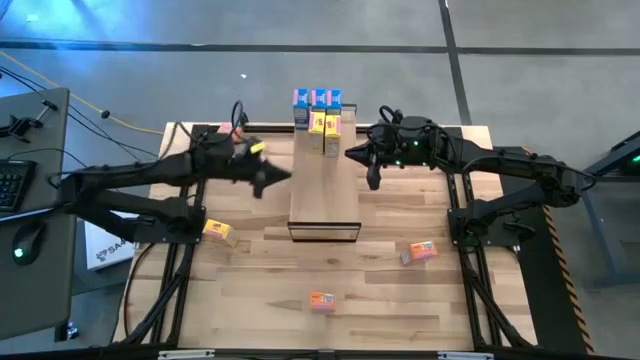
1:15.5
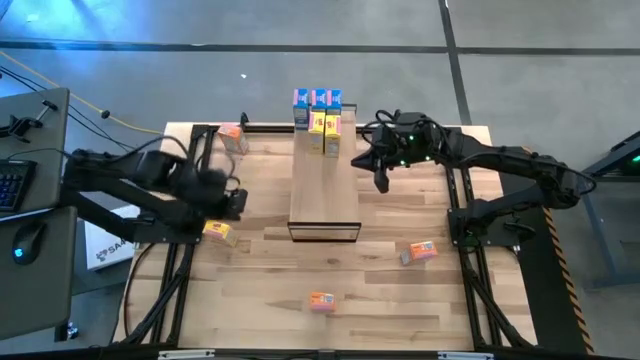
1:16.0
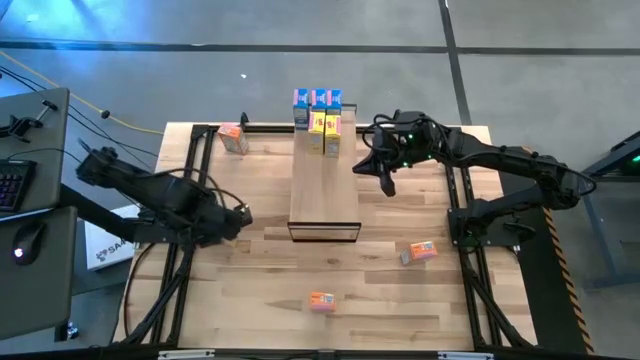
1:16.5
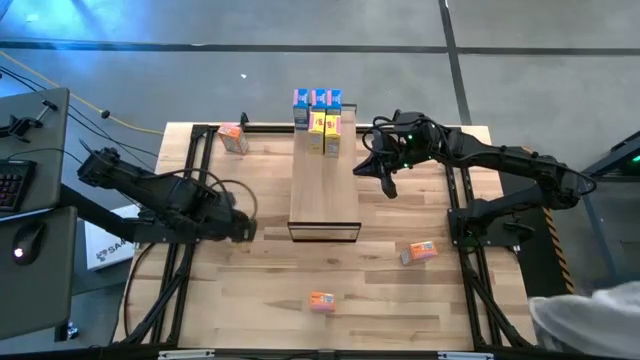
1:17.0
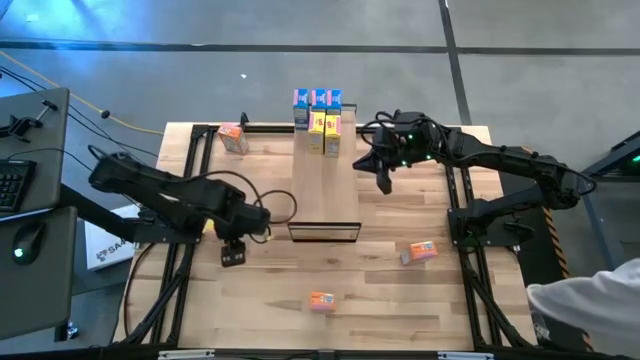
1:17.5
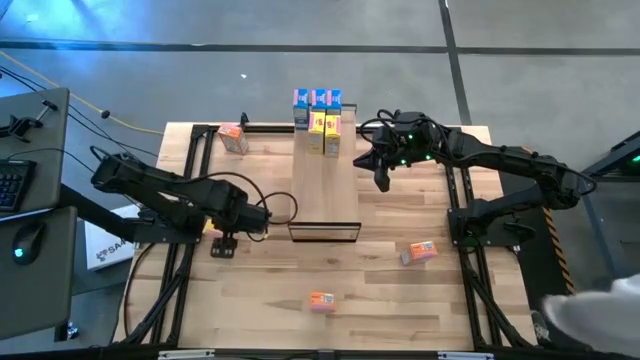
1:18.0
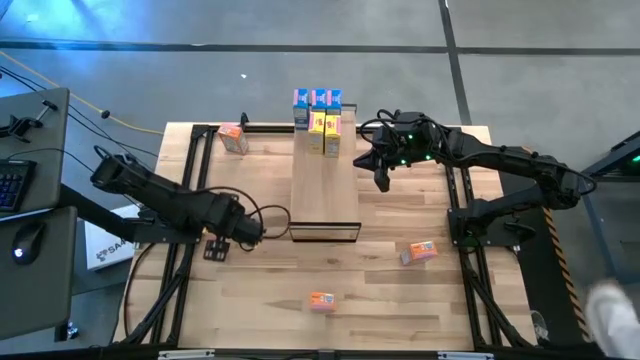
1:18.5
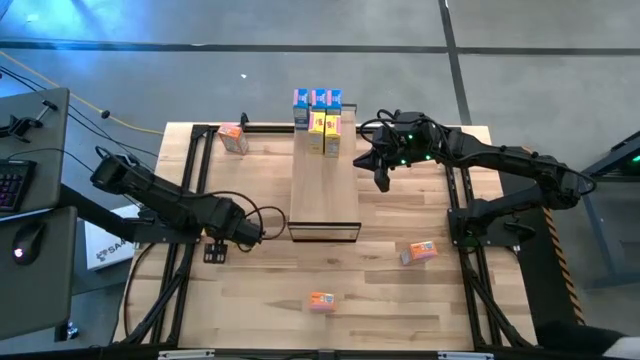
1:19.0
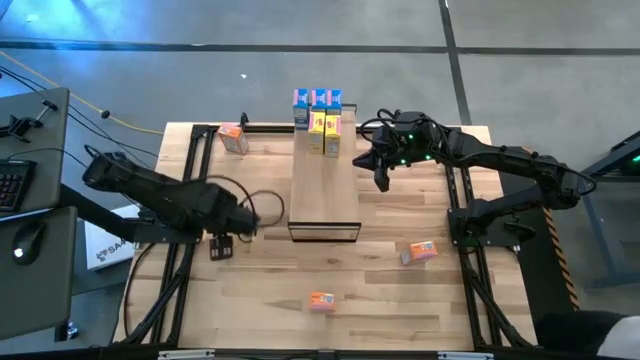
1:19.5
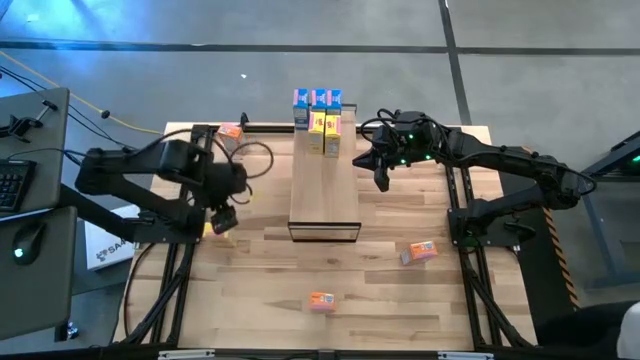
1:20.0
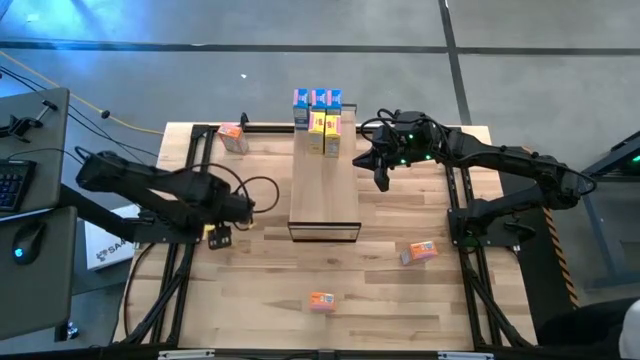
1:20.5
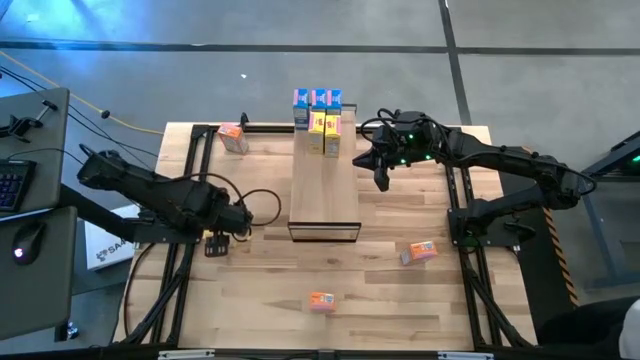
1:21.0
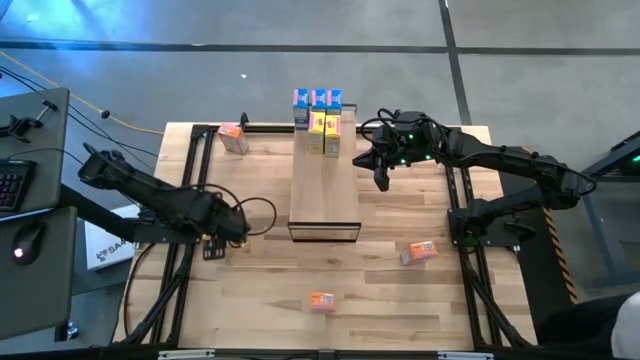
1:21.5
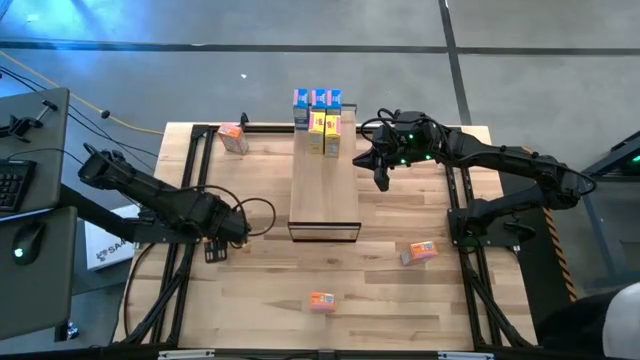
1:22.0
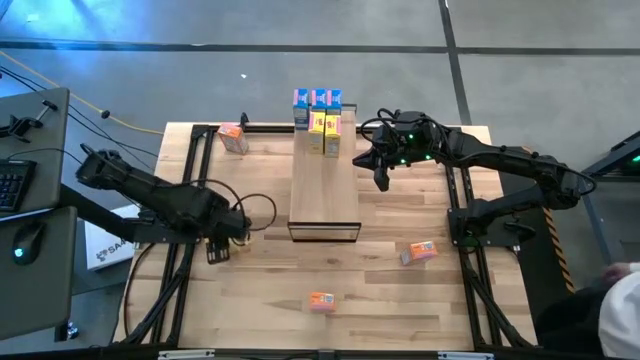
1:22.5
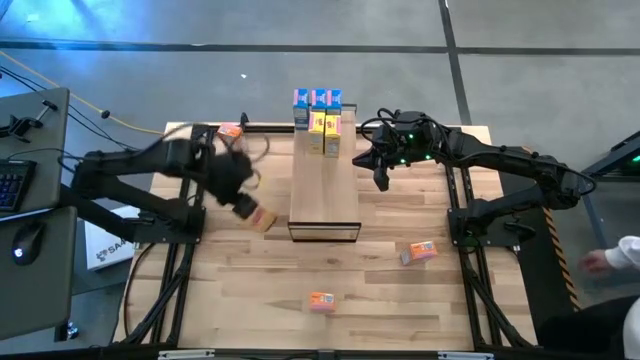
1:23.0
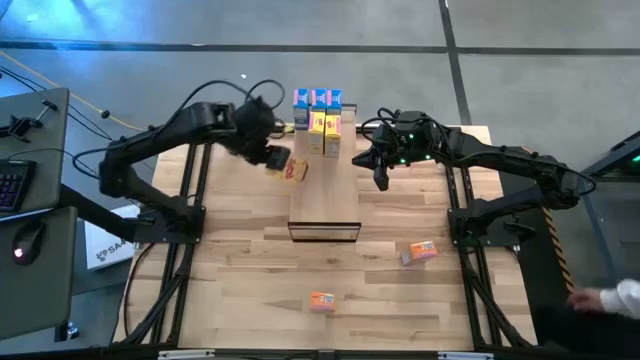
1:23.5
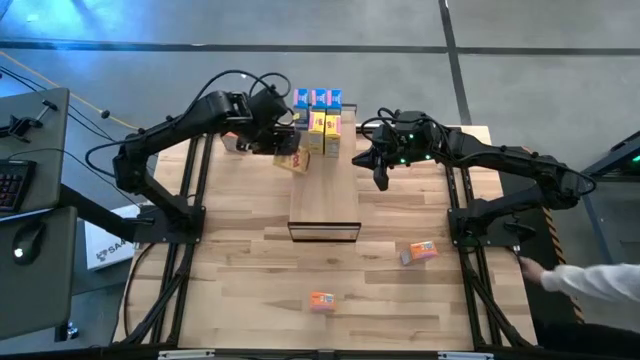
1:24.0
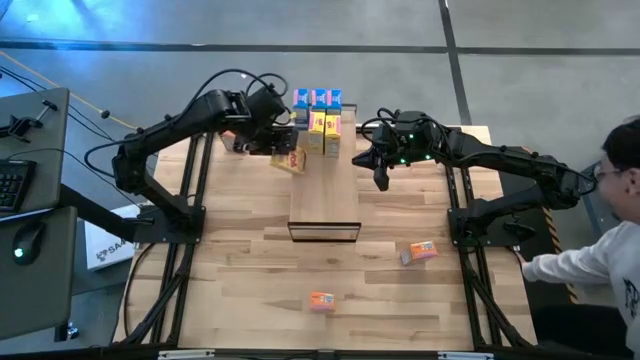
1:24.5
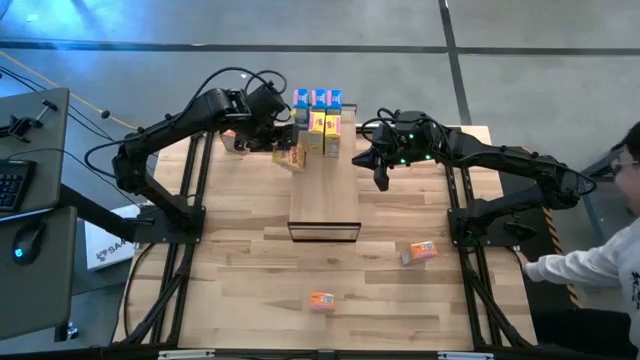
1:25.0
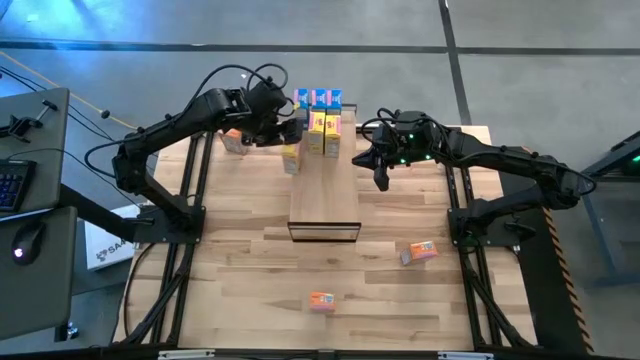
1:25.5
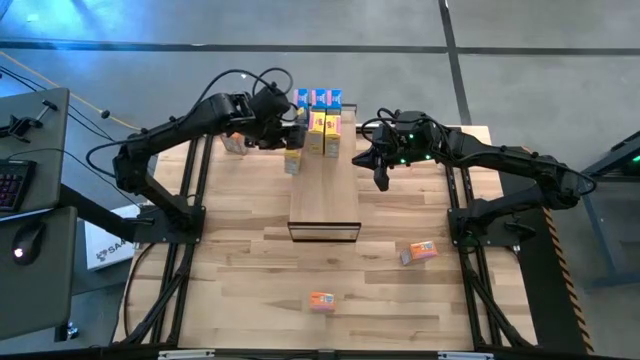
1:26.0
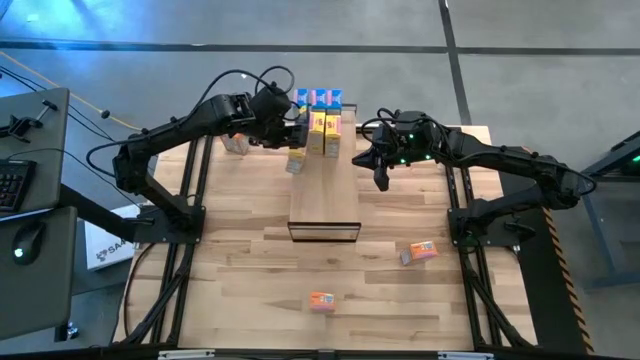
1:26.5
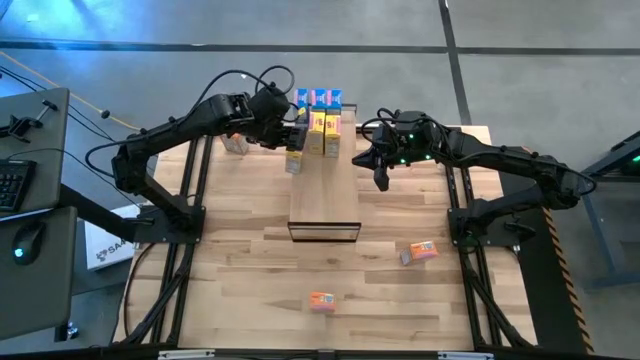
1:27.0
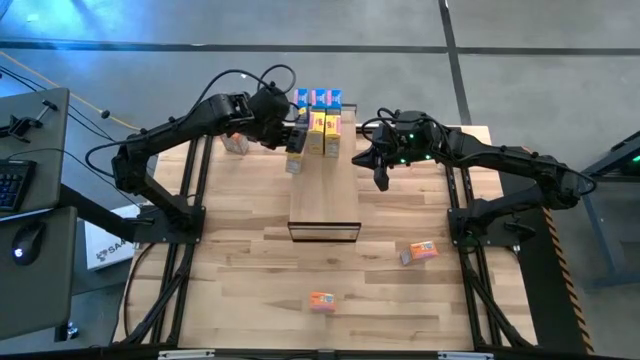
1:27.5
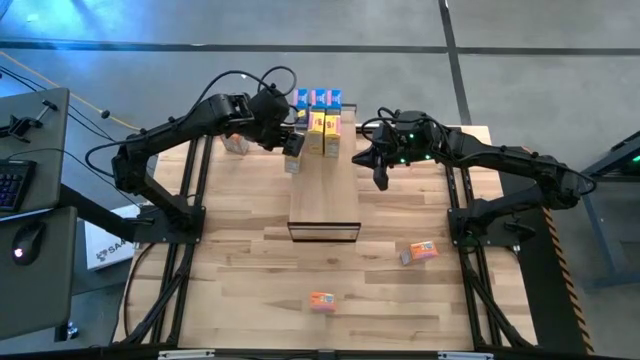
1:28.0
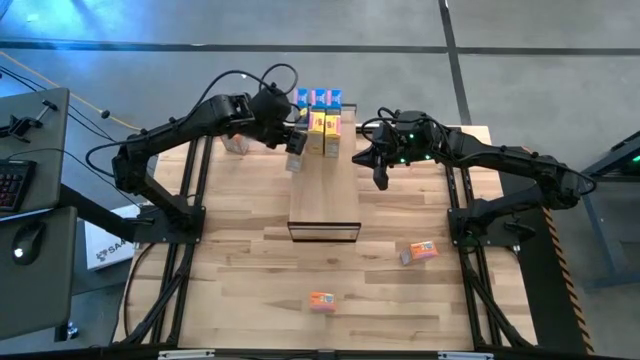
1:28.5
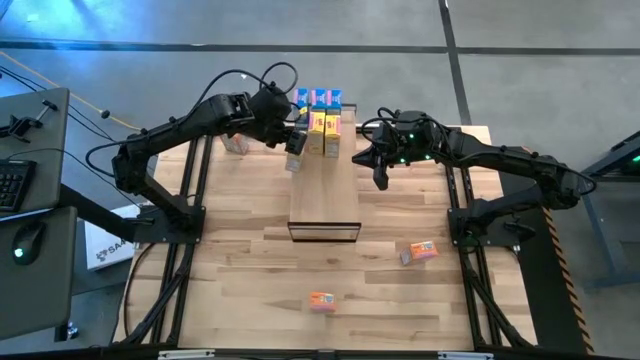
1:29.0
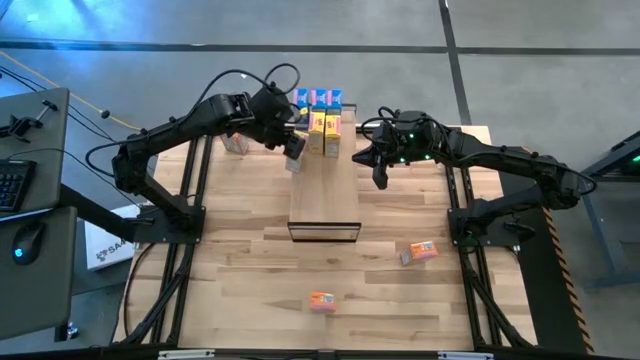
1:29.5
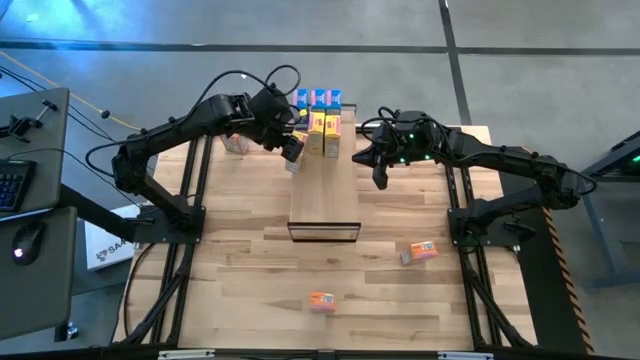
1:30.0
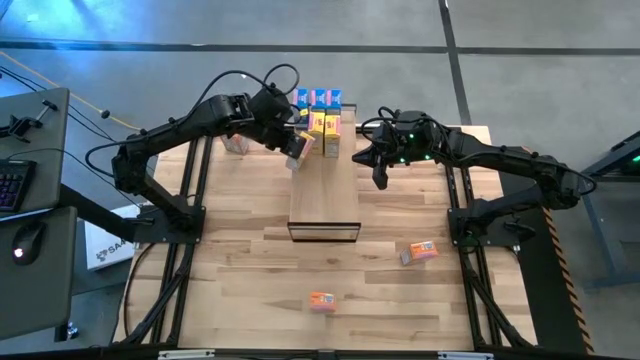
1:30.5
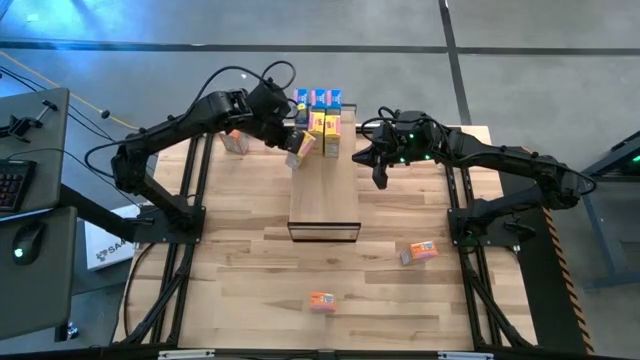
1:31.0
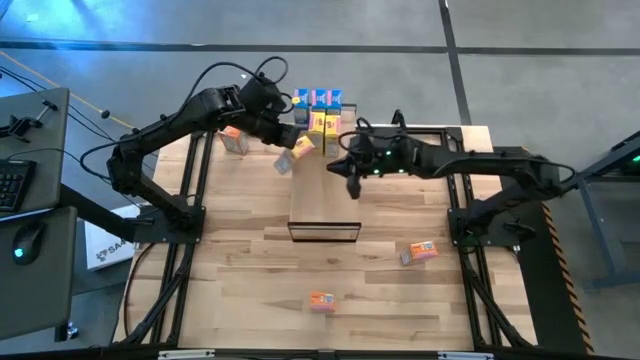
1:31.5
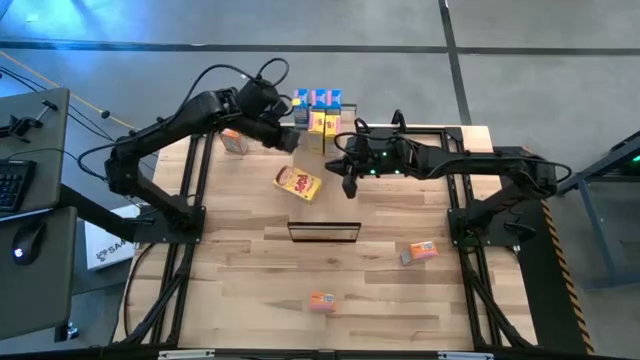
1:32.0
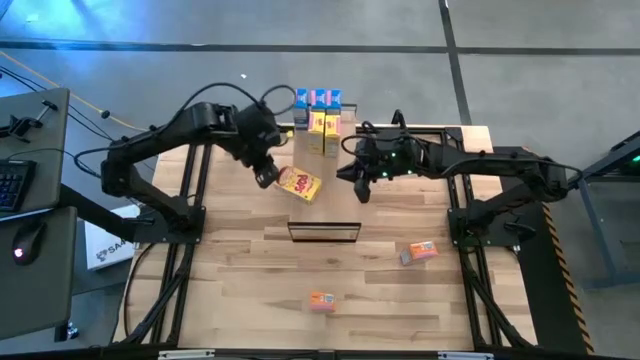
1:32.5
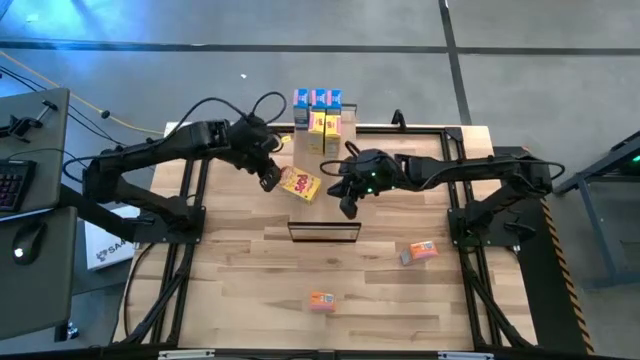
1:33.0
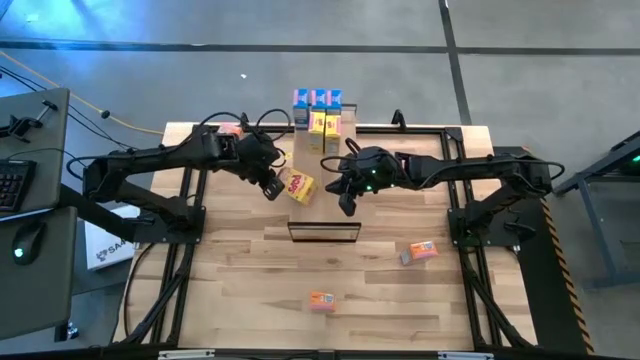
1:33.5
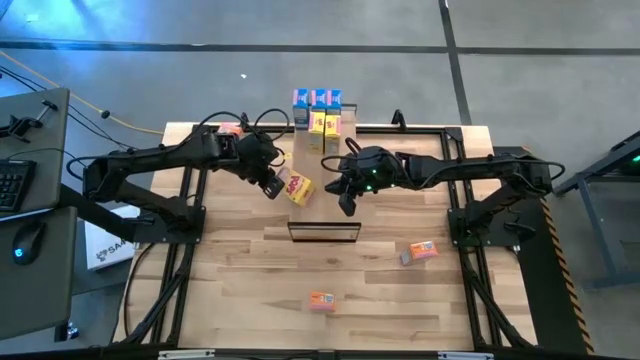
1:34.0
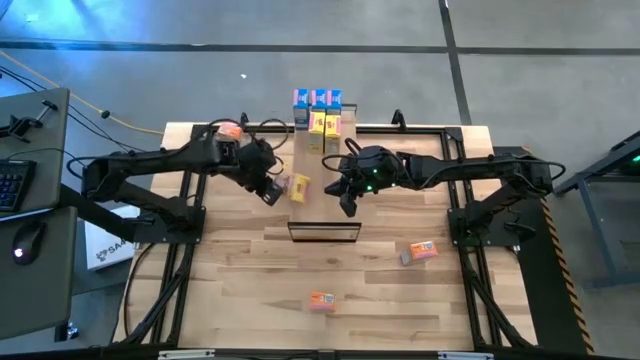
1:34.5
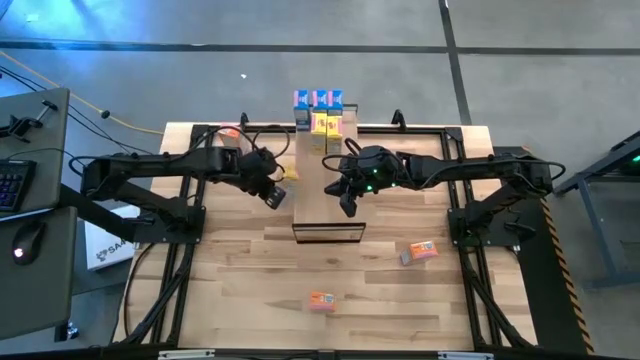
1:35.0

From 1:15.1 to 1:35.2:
Task: Stack cereal on shelf
Put the yellow cereal box on the shelf aligned with the yellow cereal boxes

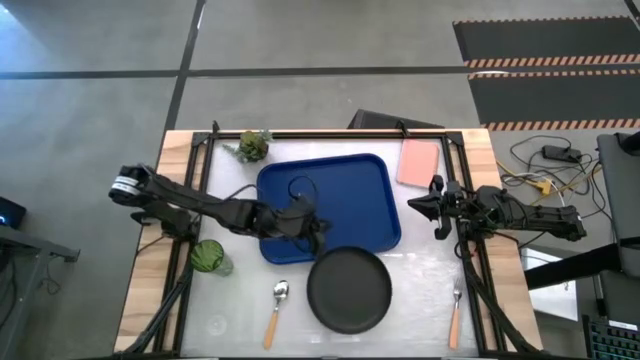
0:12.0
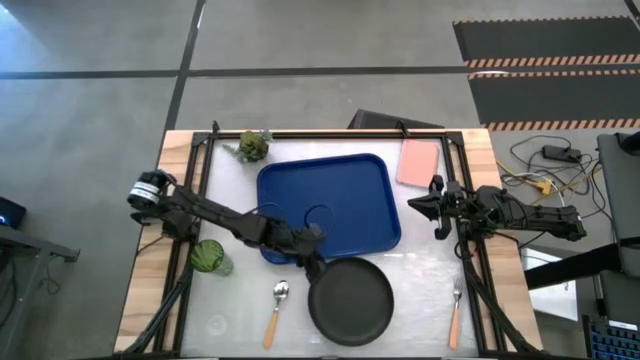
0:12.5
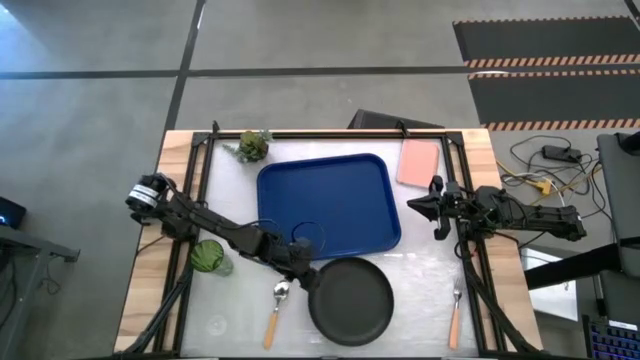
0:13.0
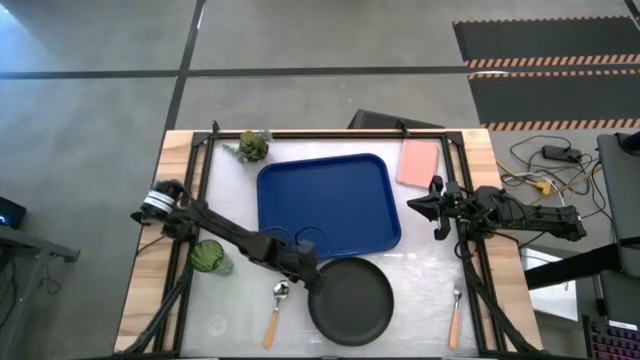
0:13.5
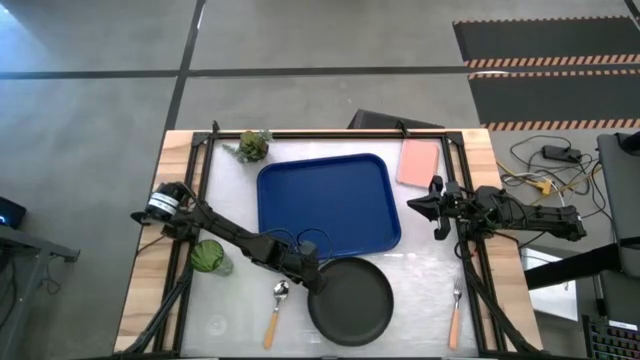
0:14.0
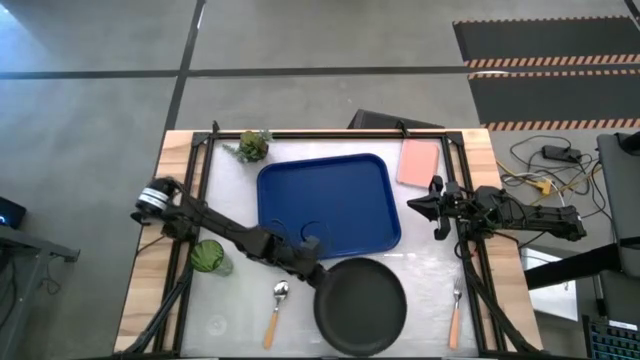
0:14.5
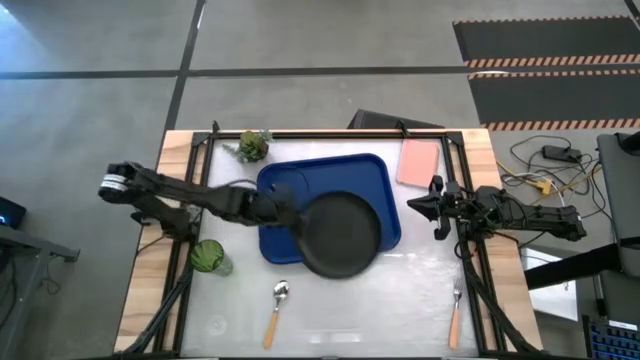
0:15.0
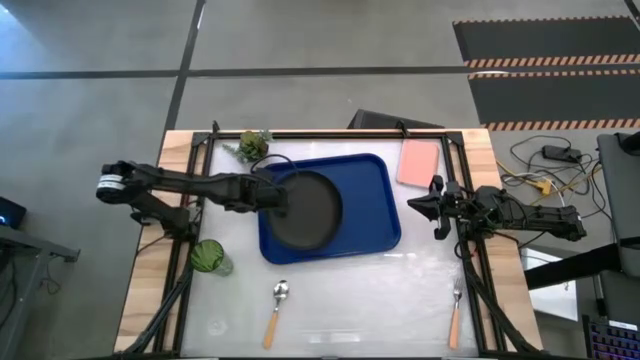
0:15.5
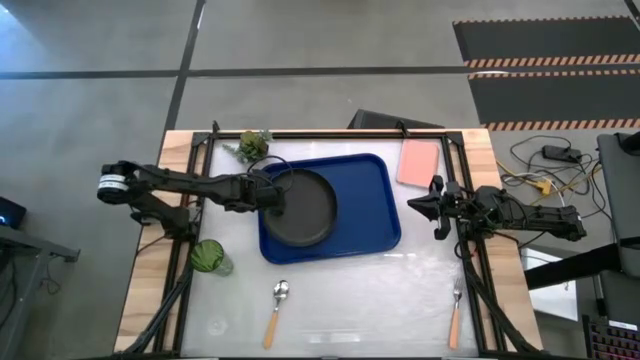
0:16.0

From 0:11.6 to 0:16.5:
Task: Pick and place plate/cup/fork/spoon on tray
Put the plate on the blue tray
